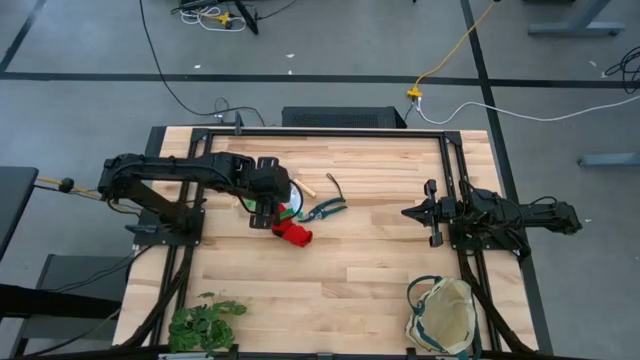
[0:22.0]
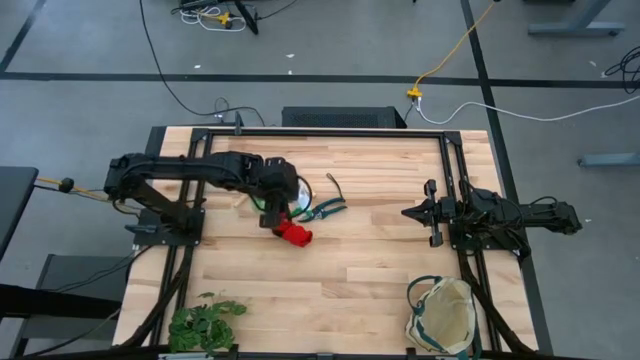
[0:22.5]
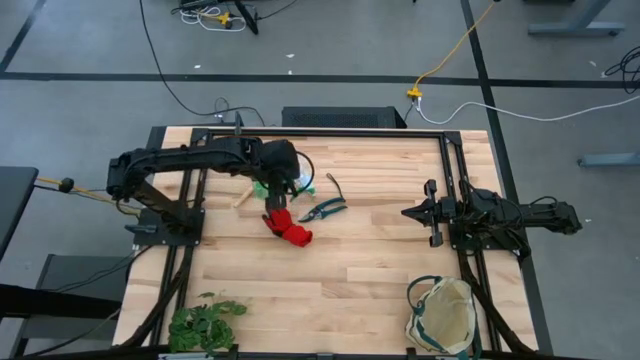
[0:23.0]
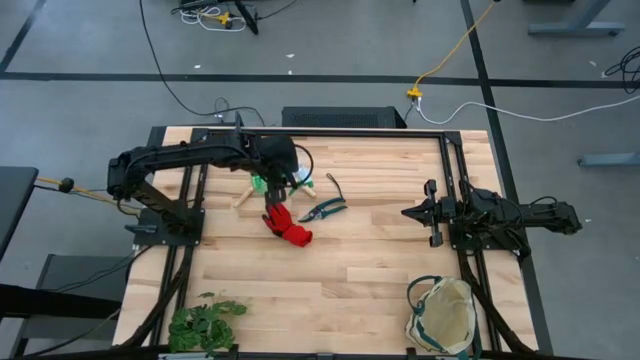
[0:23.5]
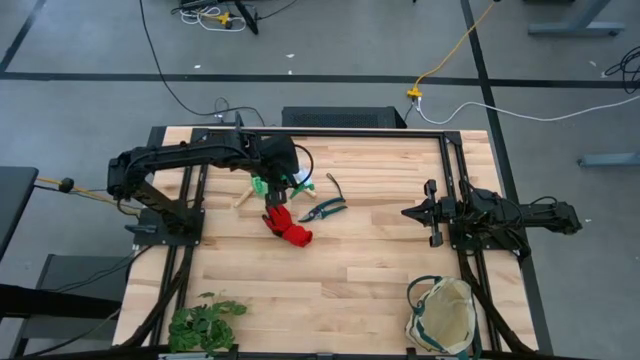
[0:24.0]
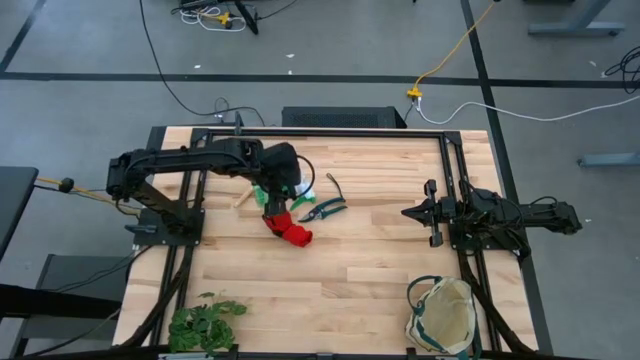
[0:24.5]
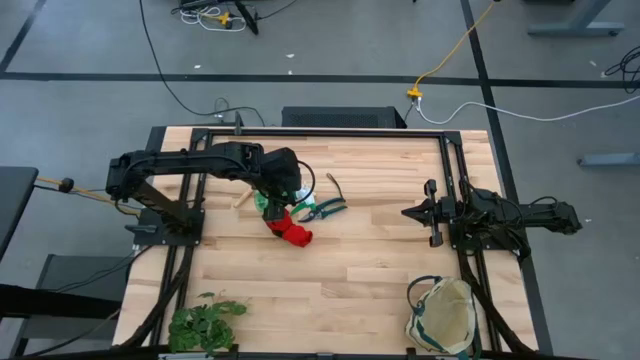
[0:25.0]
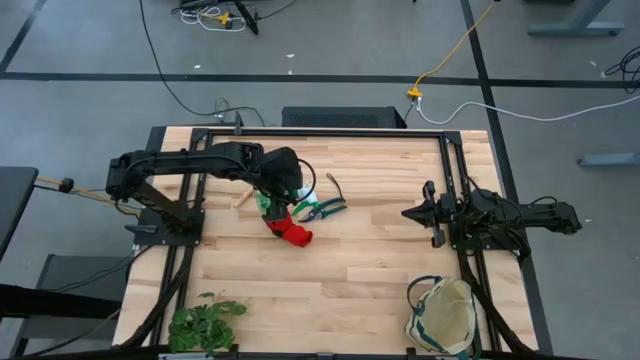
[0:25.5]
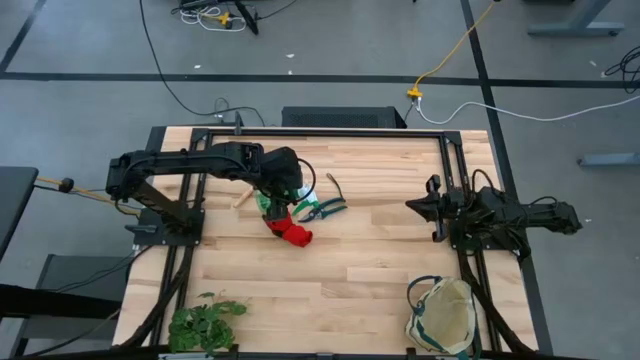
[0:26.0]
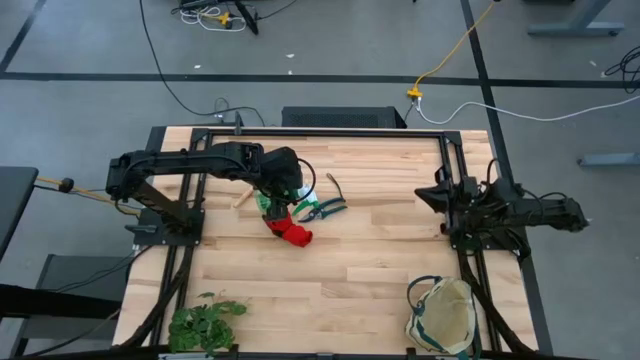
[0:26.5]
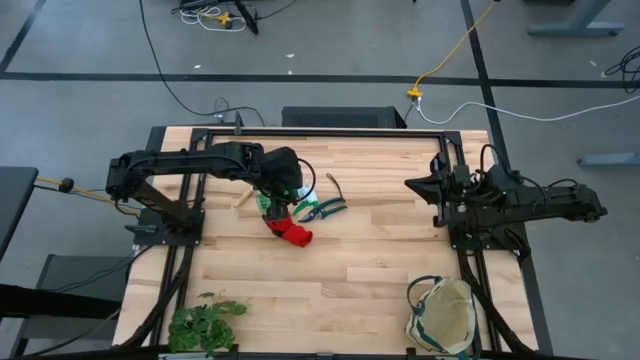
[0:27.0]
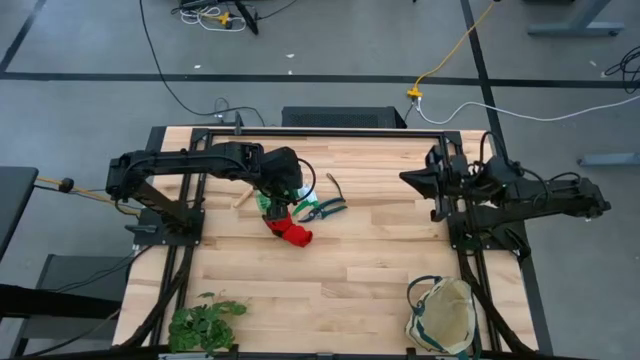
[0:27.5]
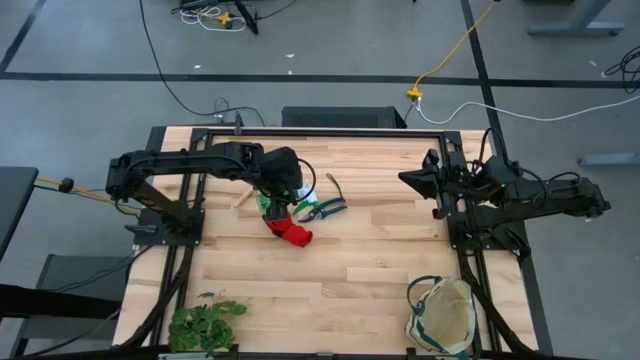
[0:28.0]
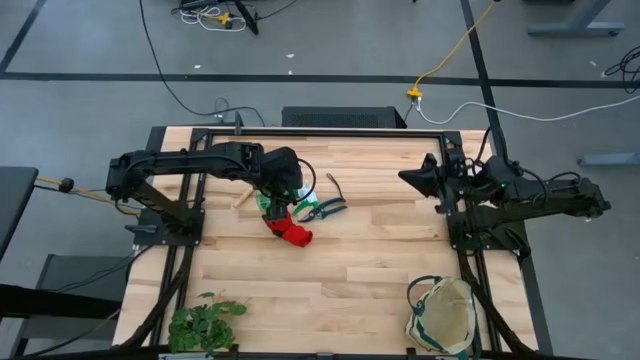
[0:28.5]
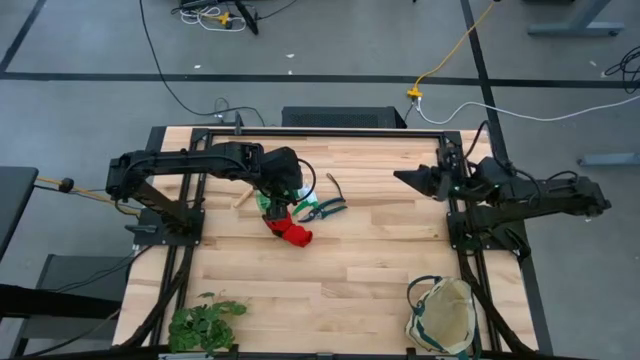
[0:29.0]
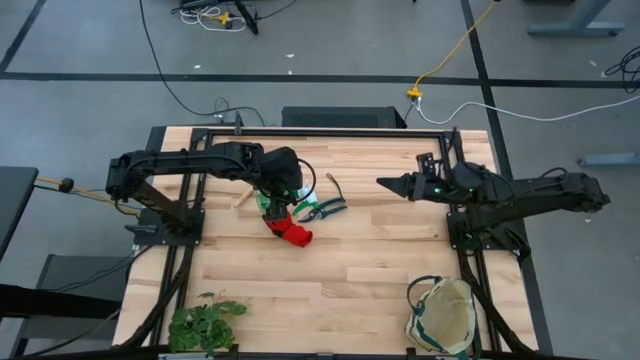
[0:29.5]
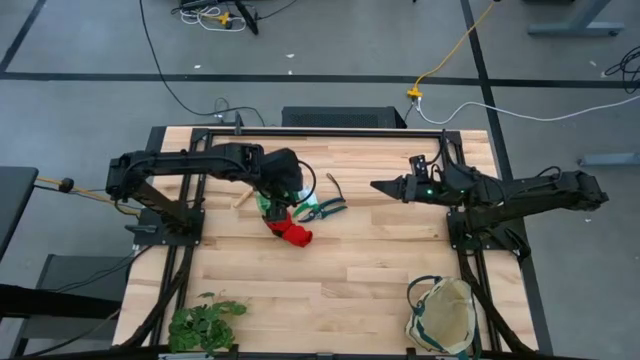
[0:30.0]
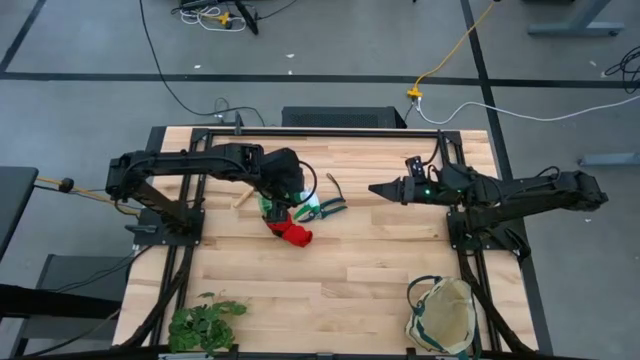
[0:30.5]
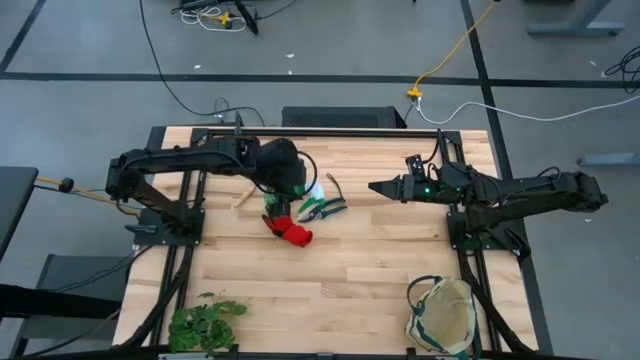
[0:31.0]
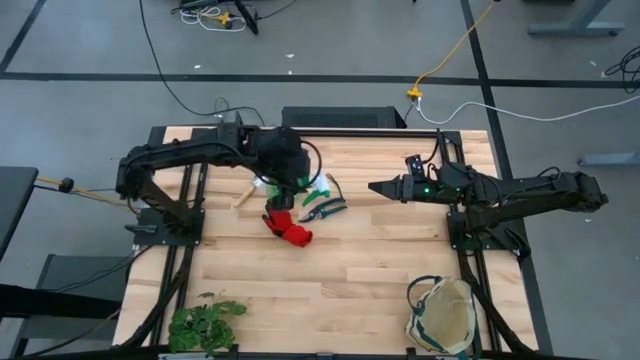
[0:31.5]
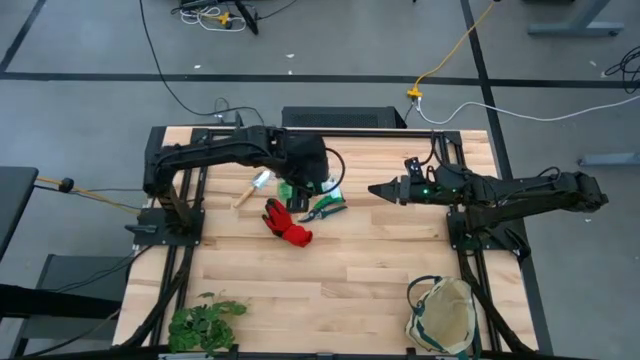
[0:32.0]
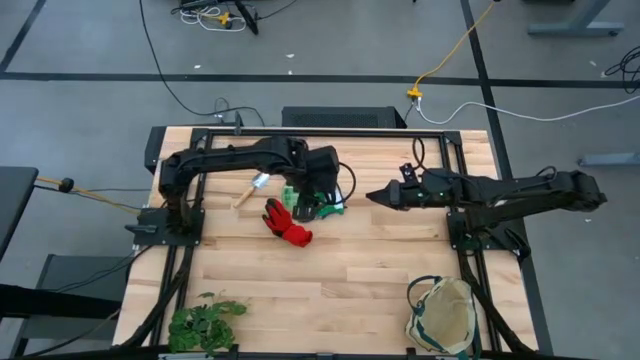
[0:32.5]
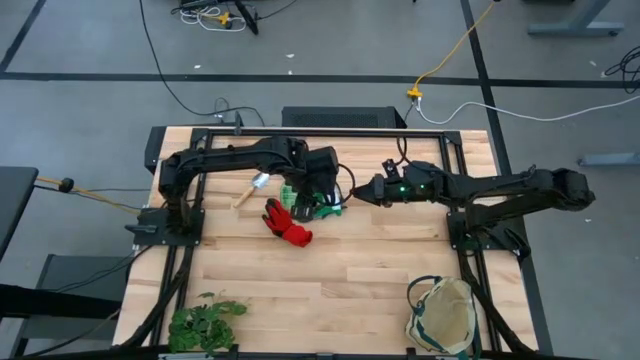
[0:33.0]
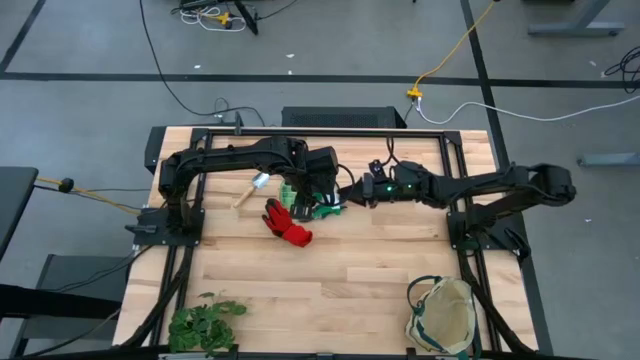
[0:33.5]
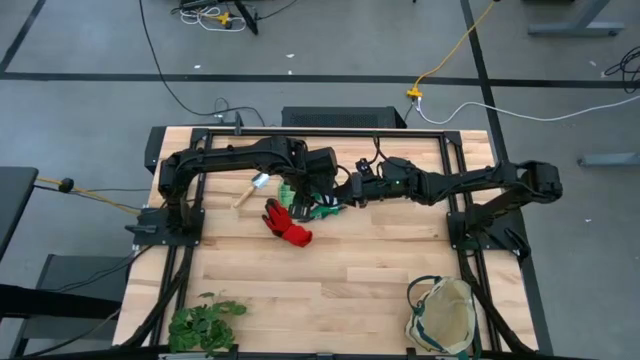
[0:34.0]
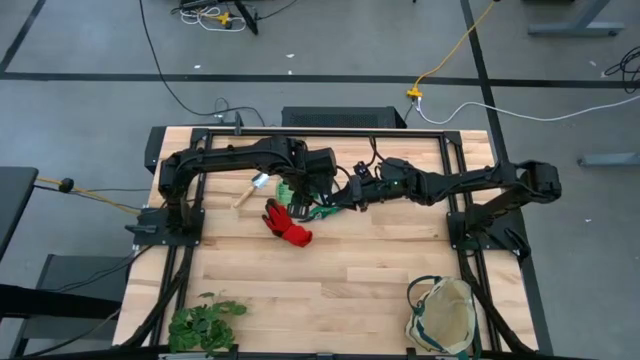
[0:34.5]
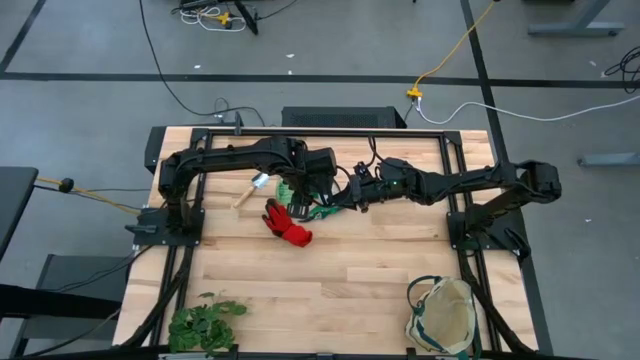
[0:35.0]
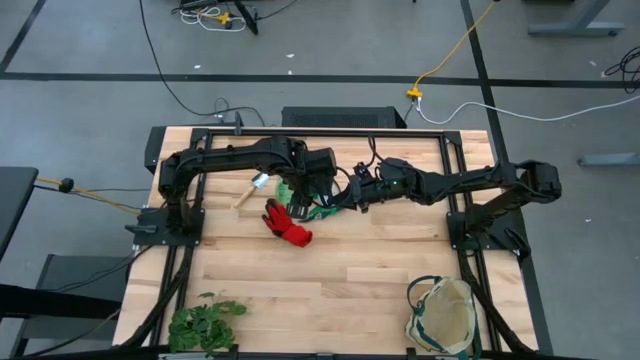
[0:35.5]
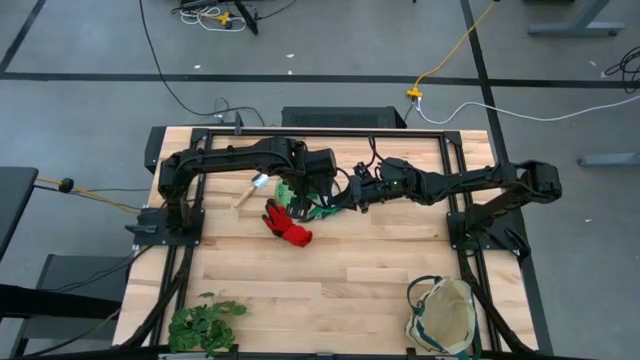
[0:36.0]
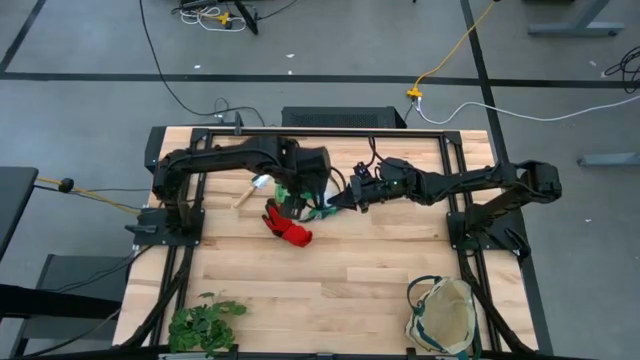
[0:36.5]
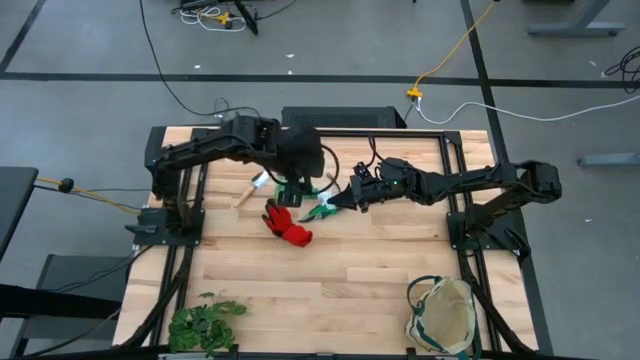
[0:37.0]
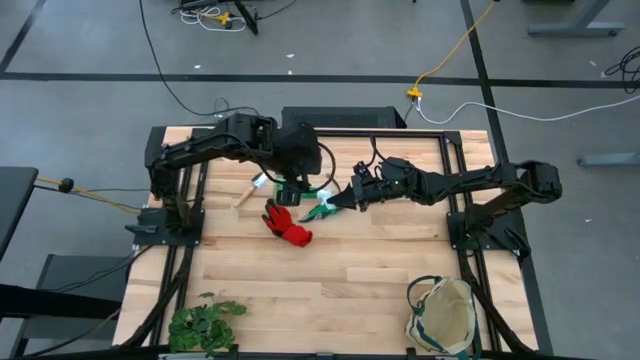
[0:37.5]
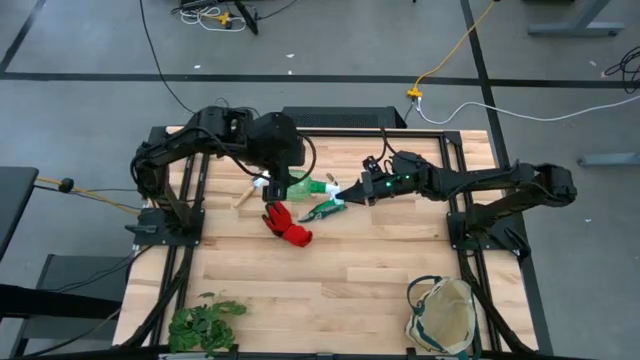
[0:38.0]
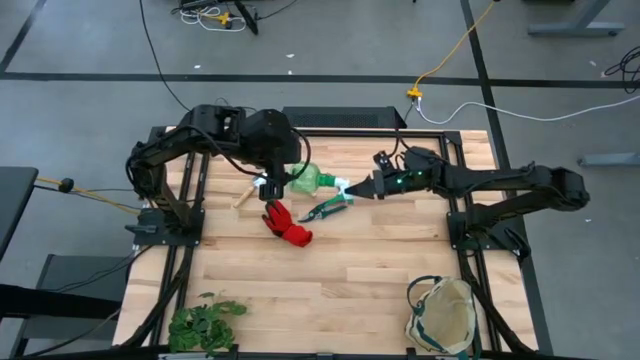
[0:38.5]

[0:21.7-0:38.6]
Task: Pick & Place Garden tools in Gardening bag
Put the green spray into the gardening bag

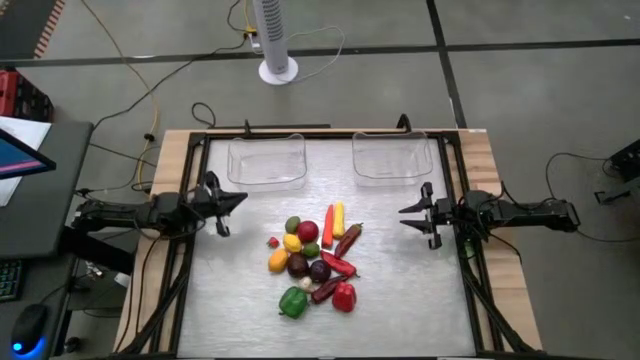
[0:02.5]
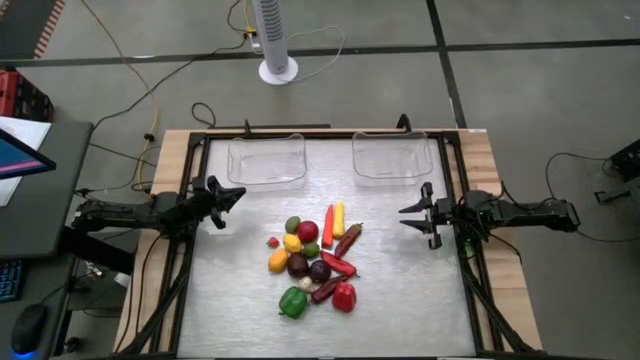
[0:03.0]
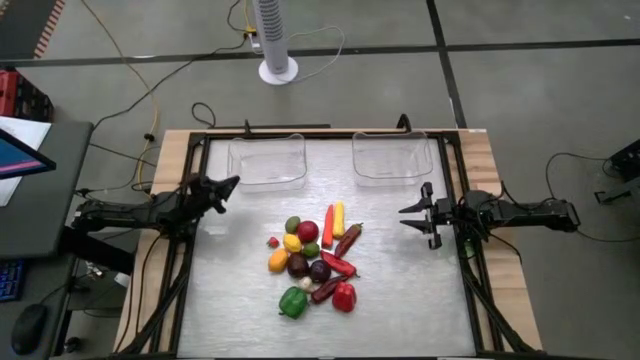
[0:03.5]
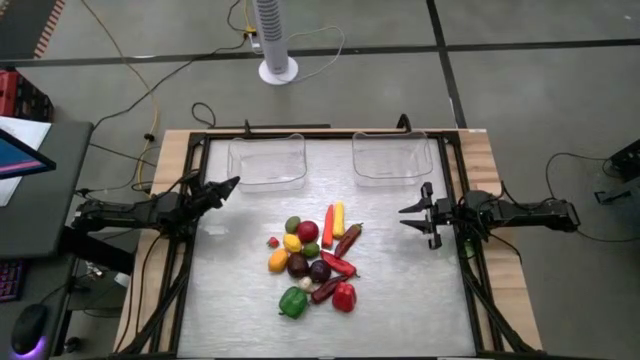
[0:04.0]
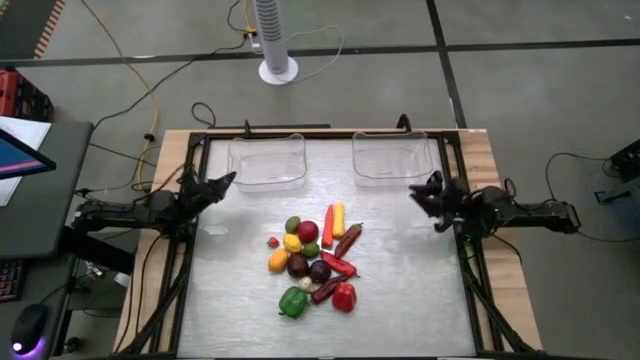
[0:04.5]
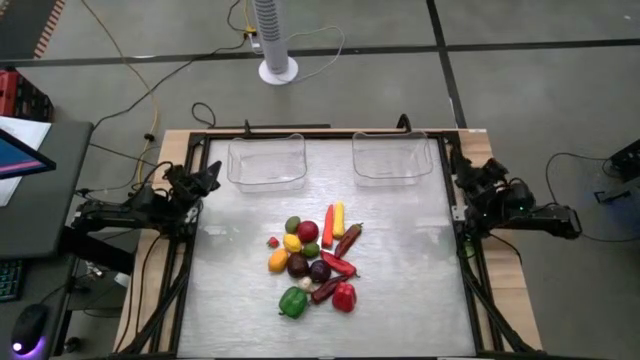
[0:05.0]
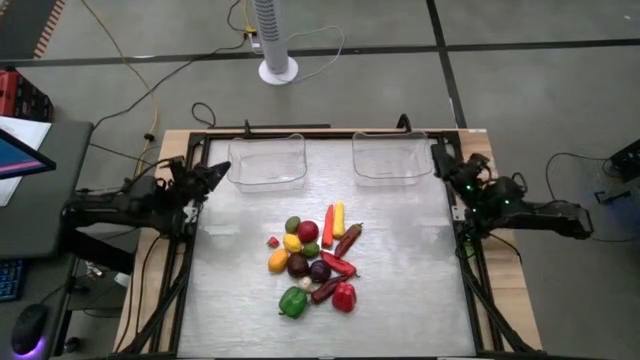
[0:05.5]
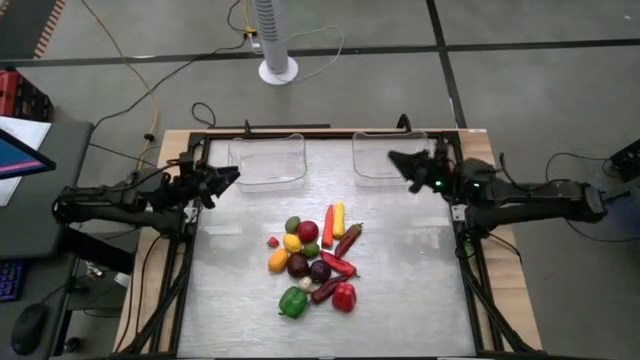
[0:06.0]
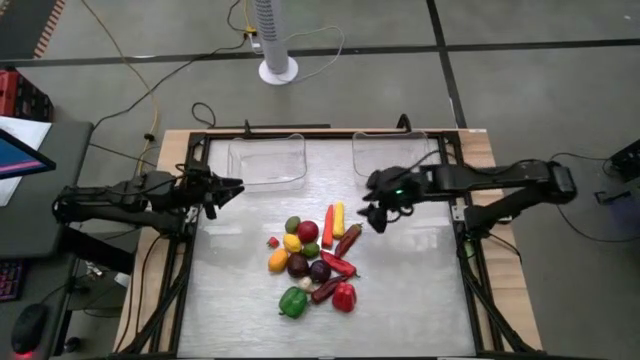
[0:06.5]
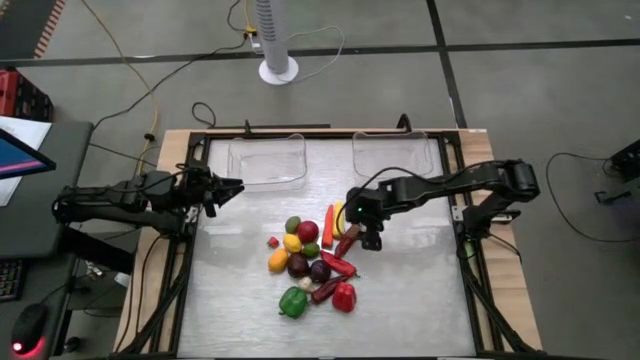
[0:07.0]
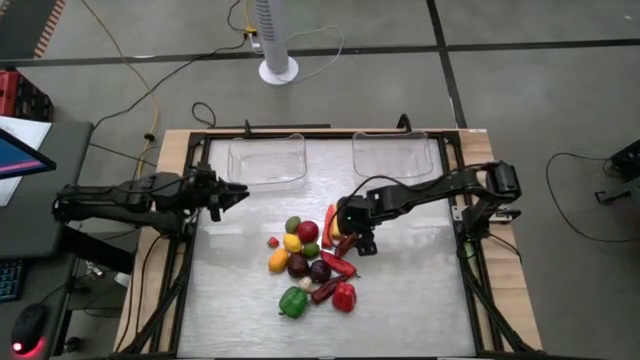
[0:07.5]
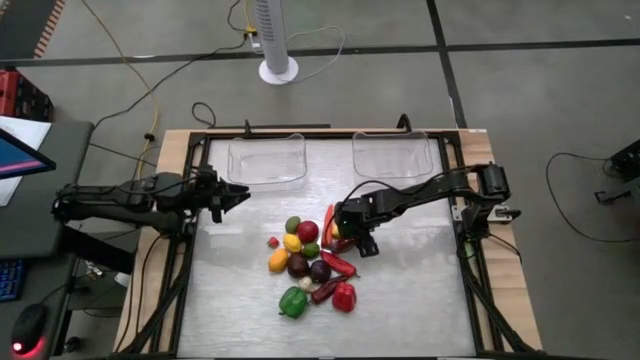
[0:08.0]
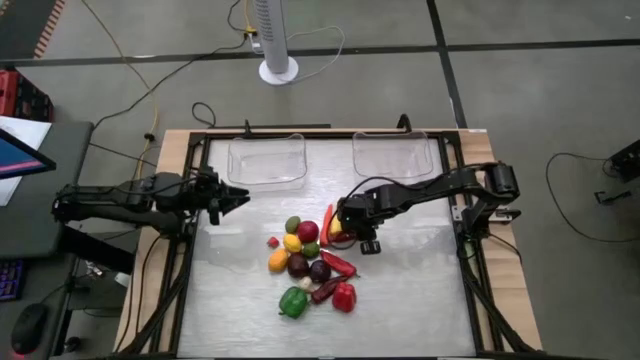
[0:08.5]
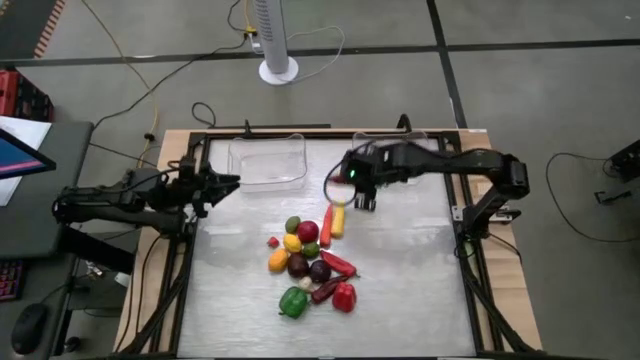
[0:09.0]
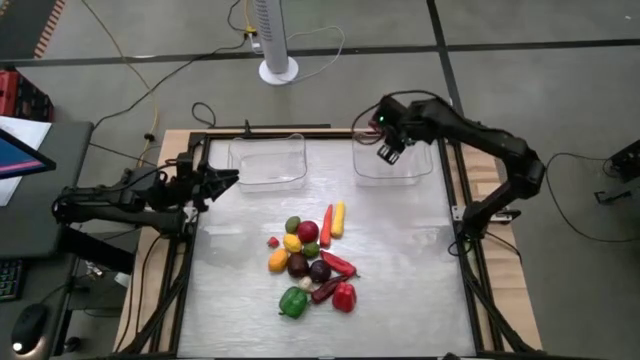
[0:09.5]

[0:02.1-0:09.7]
Task: Sort produce into baskets
Put the dark red chili pepper into the right transparent bin
